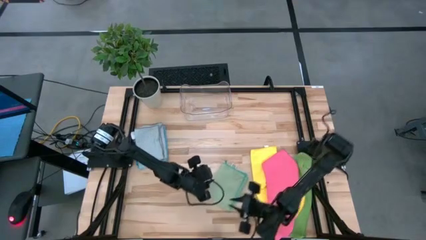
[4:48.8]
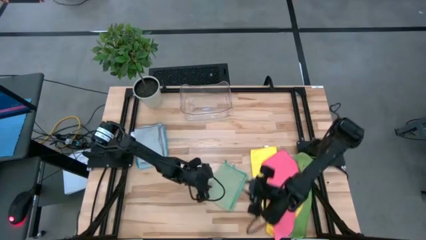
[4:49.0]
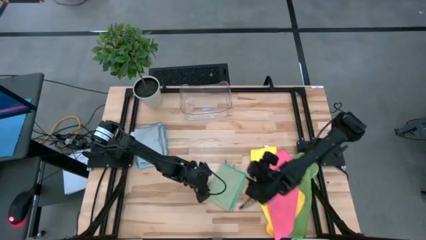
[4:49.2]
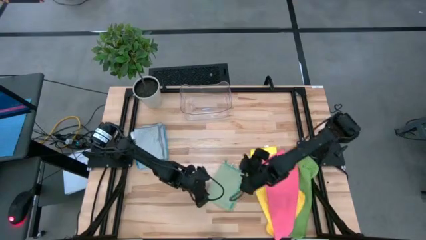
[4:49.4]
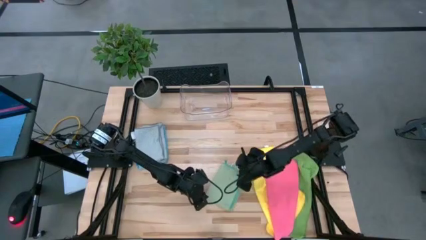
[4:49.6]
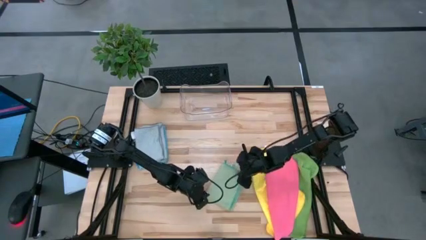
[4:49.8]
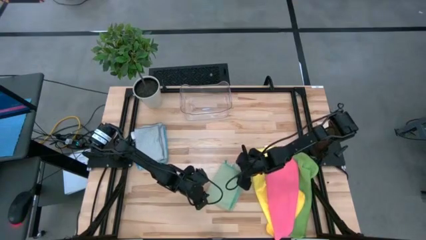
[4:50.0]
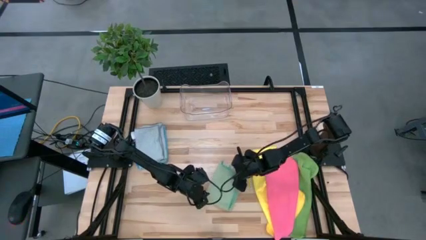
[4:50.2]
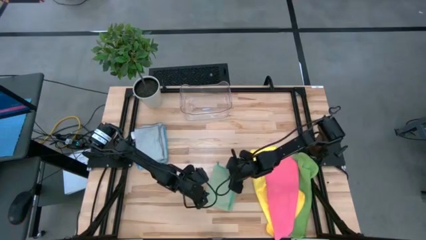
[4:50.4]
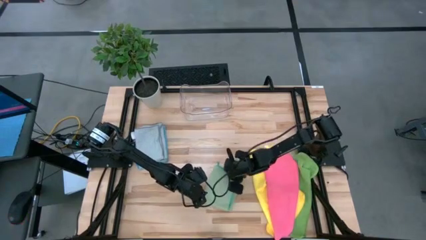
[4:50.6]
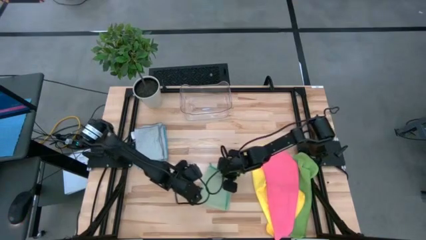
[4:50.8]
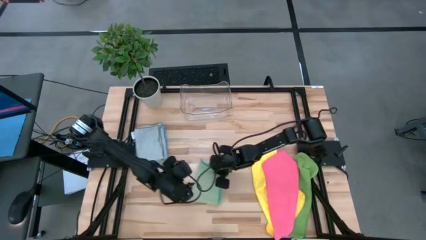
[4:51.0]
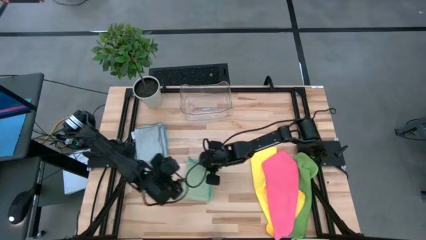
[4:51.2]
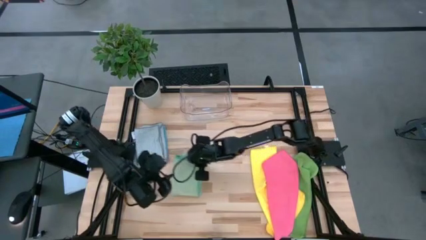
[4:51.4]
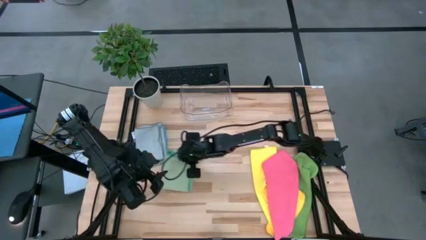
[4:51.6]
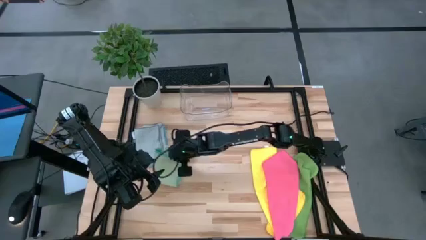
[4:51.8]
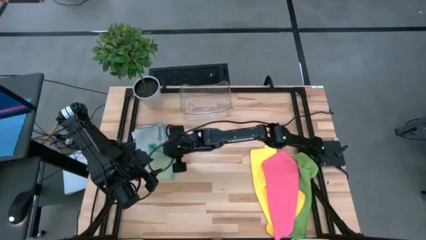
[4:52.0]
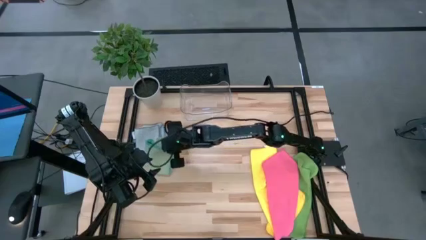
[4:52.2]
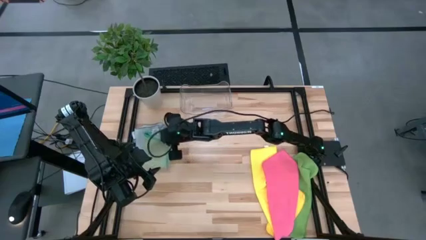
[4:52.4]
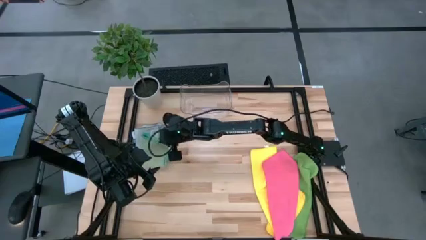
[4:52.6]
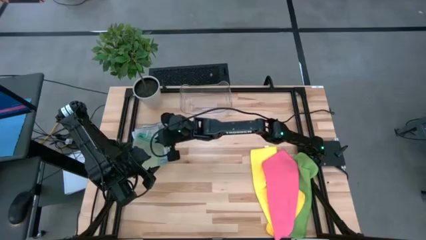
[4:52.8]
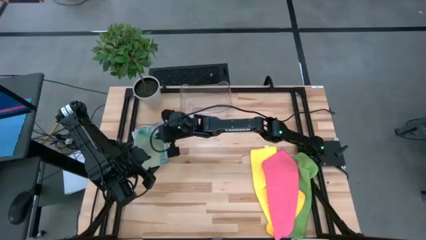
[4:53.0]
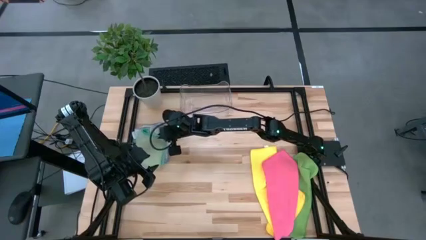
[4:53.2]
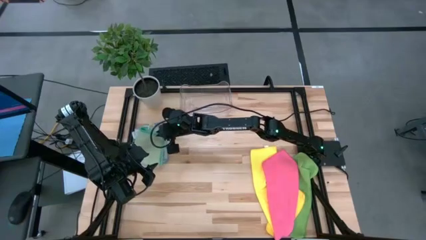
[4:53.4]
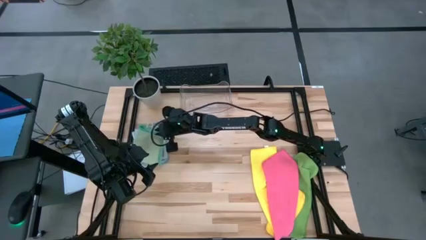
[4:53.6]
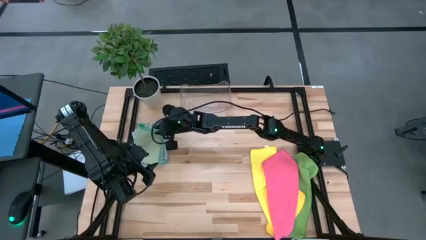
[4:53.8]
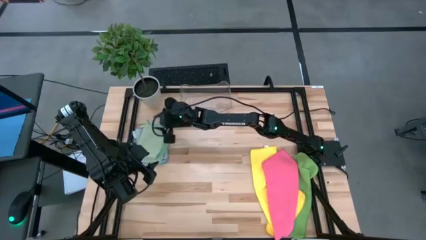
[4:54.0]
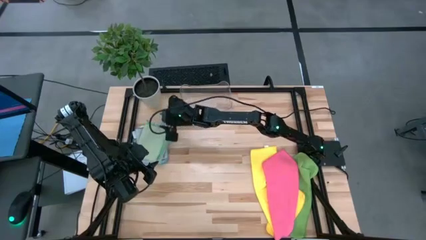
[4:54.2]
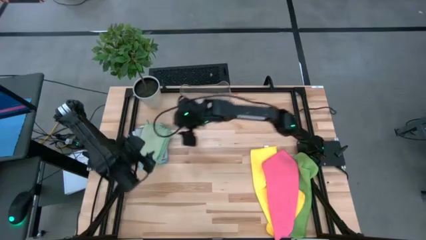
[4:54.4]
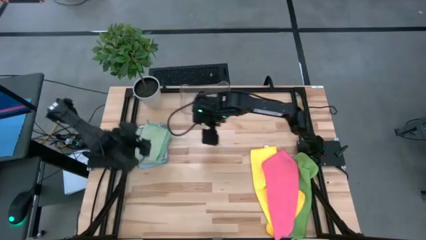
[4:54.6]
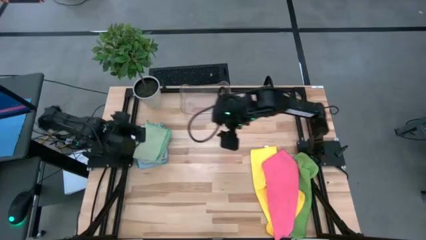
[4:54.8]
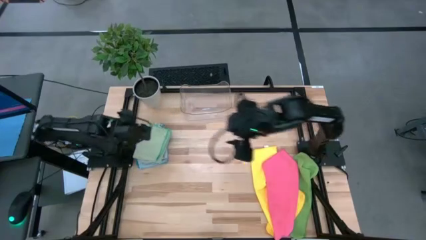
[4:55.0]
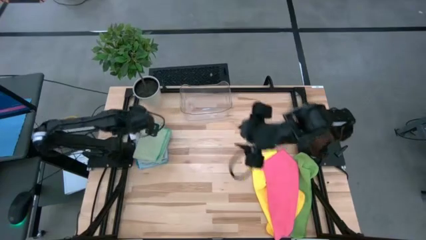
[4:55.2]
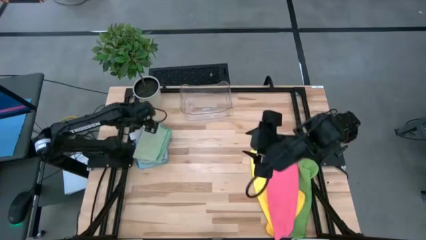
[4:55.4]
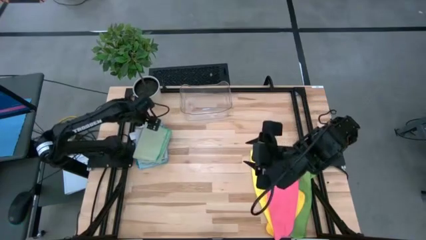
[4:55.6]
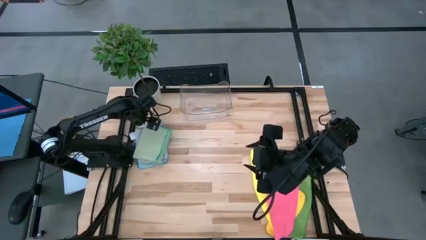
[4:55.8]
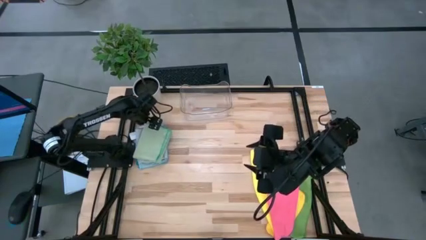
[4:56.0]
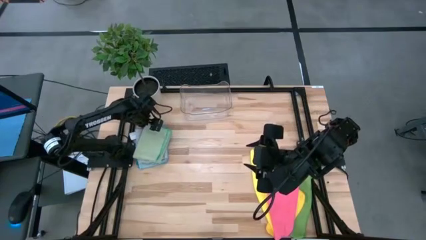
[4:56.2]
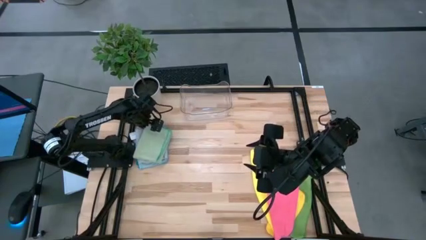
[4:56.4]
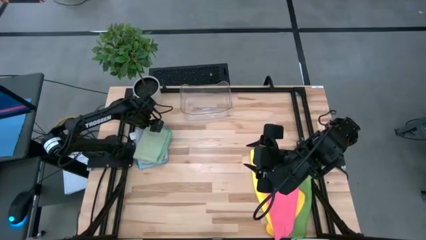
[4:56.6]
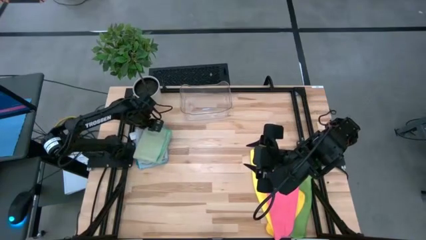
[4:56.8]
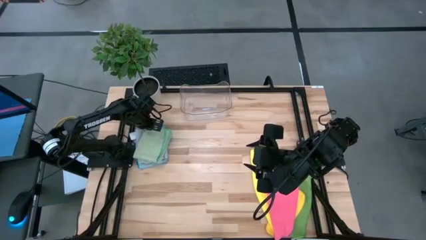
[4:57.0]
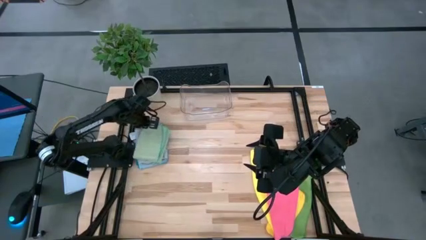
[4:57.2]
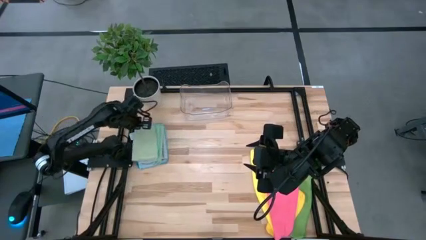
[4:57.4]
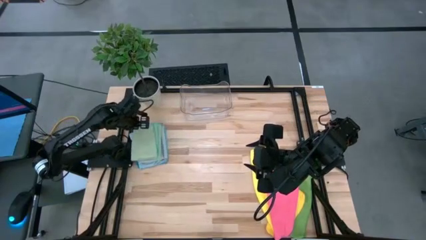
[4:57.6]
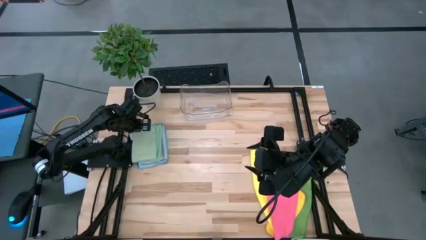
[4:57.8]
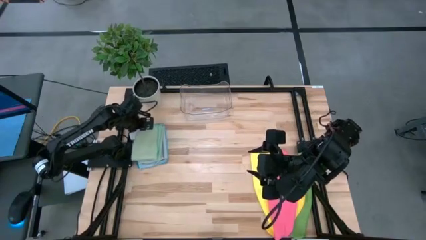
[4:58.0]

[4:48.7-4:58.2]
Task: Fold microfiber towels
Stack the folded light green microfiber cloth on top of the folded gray microfiber cloth

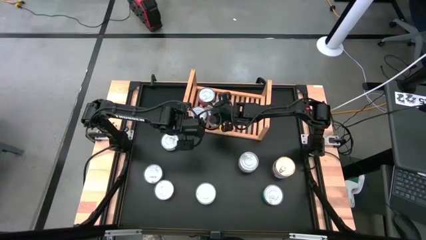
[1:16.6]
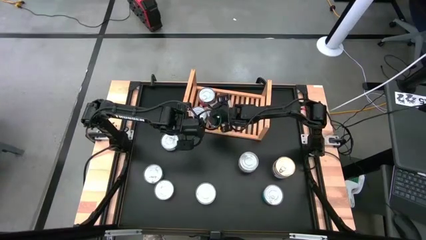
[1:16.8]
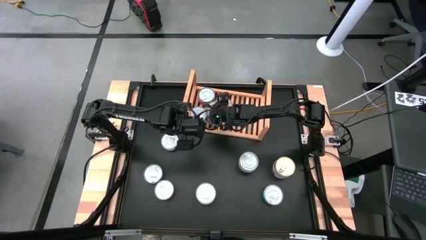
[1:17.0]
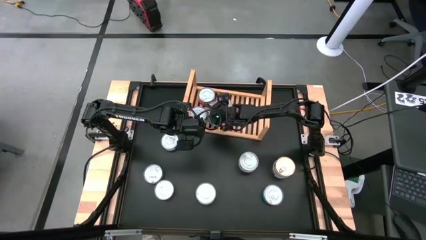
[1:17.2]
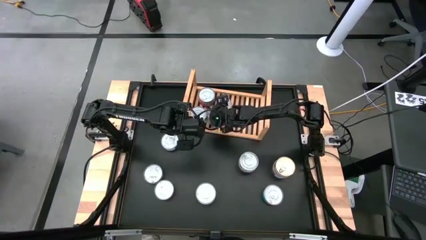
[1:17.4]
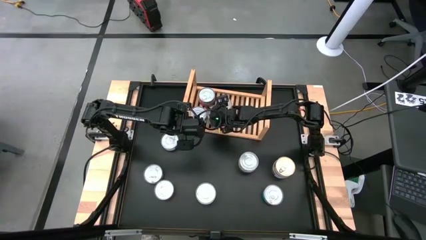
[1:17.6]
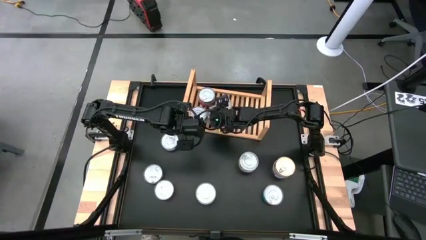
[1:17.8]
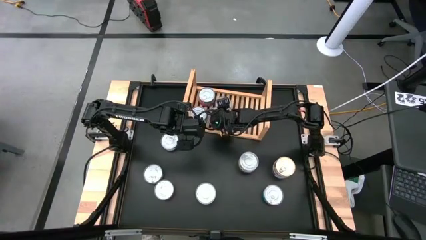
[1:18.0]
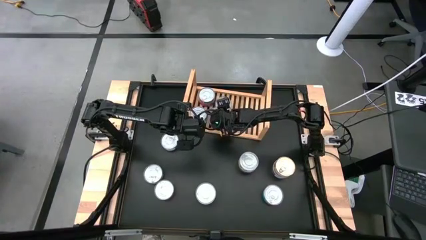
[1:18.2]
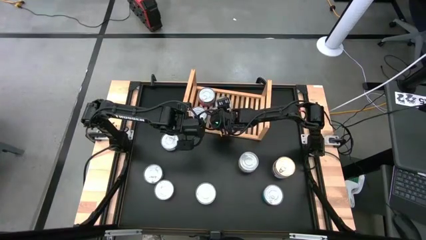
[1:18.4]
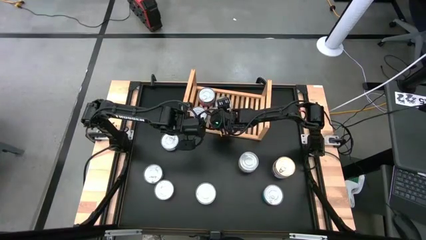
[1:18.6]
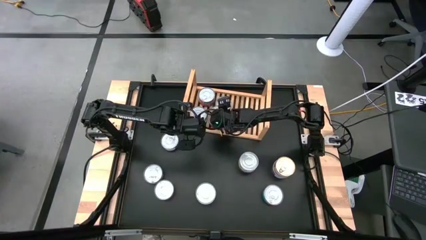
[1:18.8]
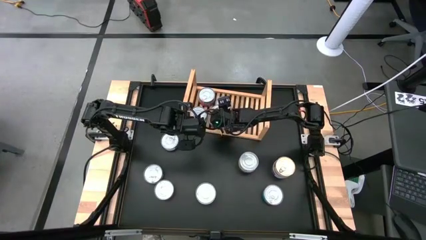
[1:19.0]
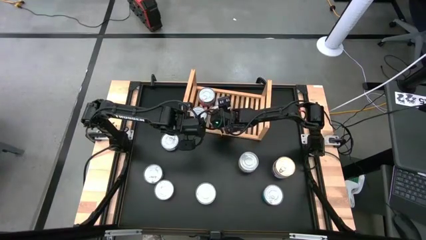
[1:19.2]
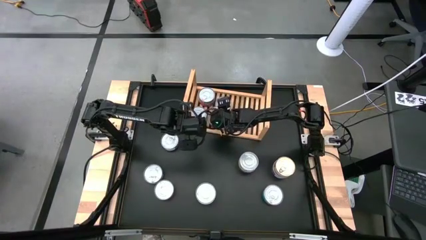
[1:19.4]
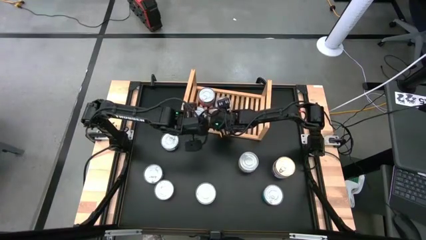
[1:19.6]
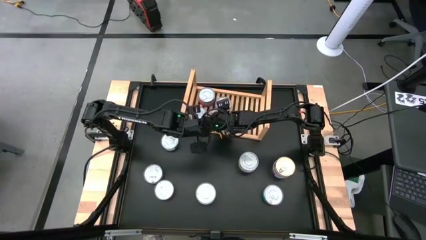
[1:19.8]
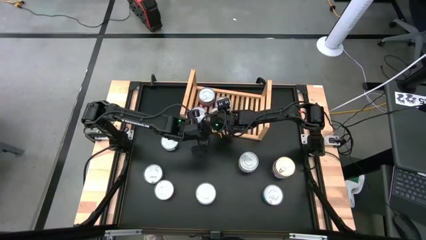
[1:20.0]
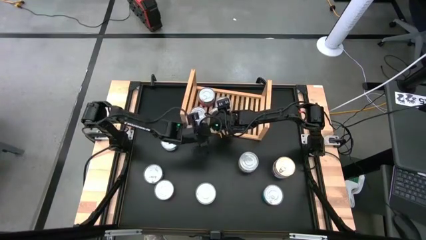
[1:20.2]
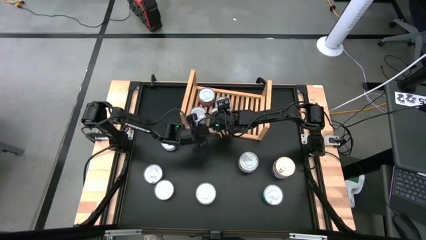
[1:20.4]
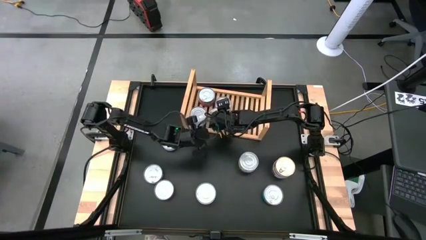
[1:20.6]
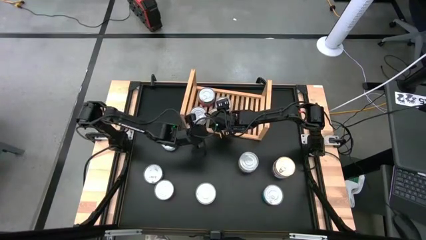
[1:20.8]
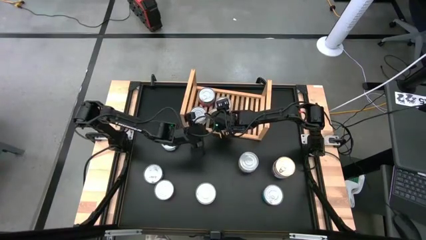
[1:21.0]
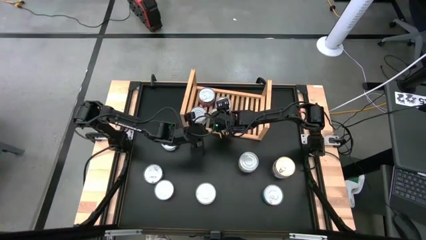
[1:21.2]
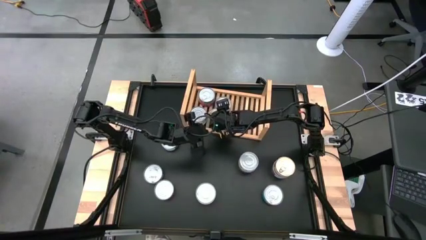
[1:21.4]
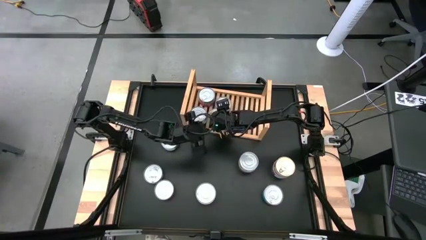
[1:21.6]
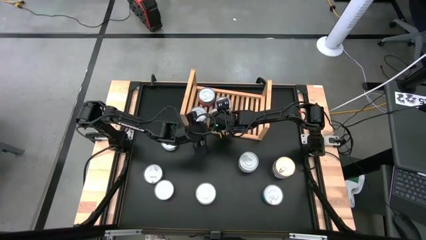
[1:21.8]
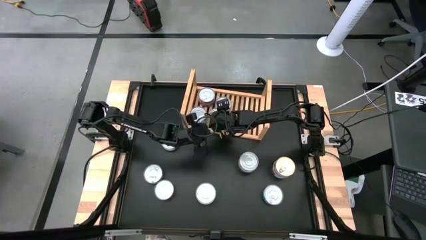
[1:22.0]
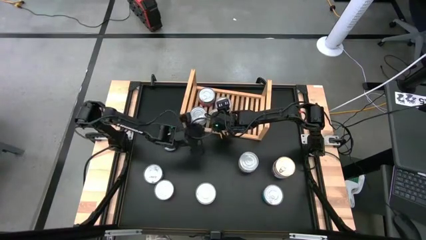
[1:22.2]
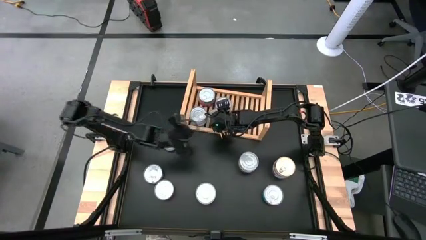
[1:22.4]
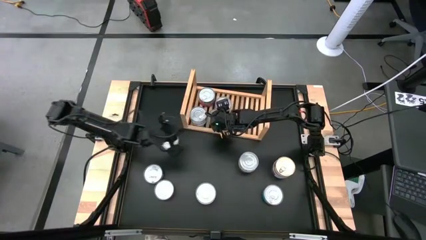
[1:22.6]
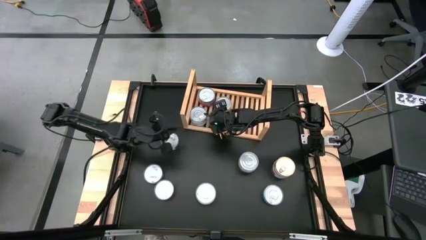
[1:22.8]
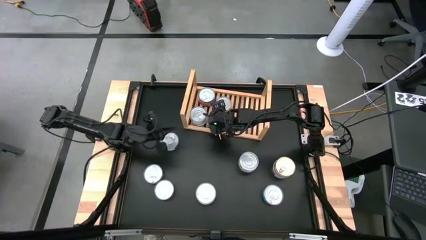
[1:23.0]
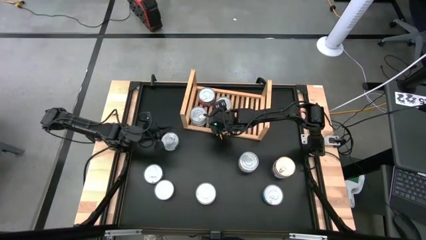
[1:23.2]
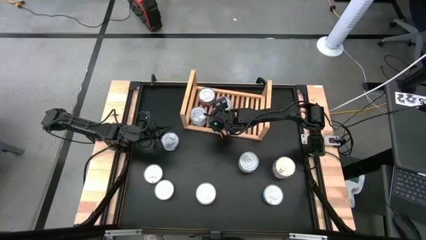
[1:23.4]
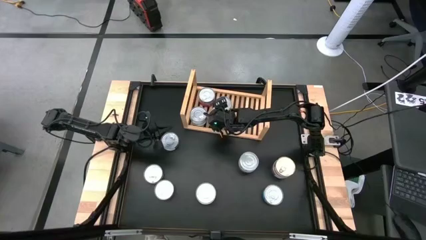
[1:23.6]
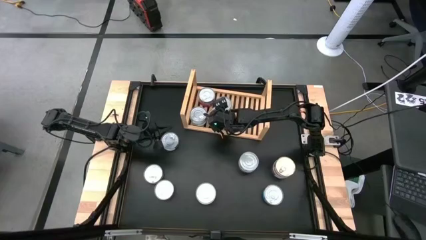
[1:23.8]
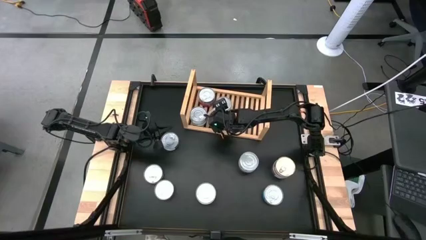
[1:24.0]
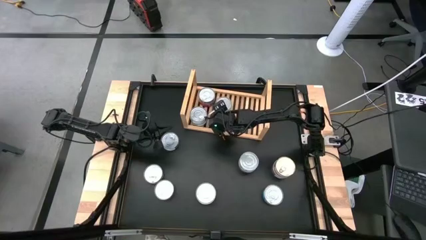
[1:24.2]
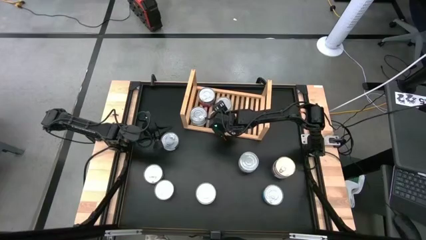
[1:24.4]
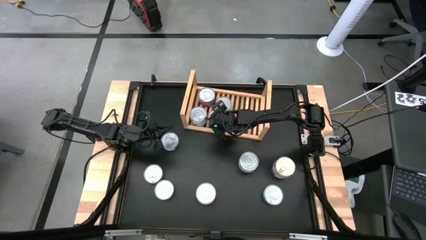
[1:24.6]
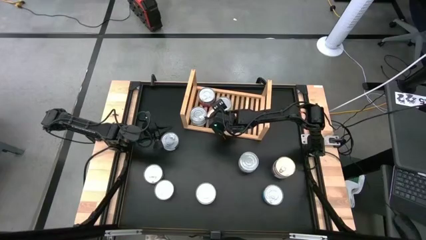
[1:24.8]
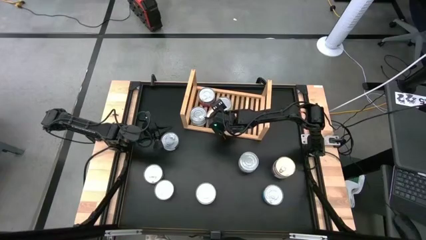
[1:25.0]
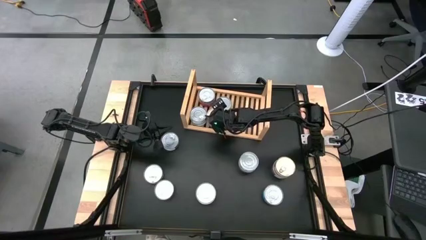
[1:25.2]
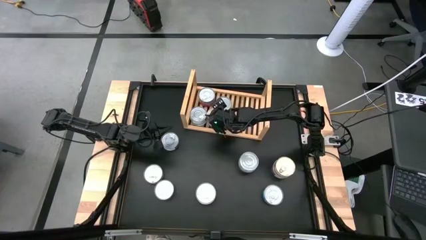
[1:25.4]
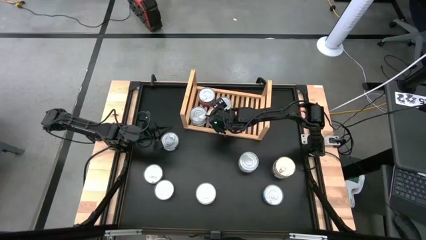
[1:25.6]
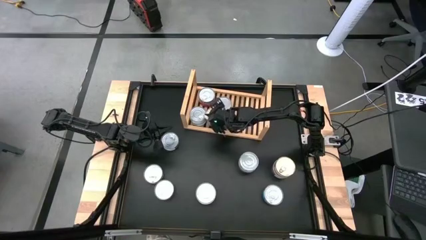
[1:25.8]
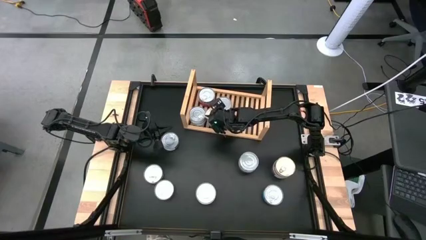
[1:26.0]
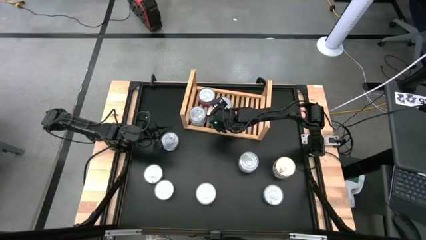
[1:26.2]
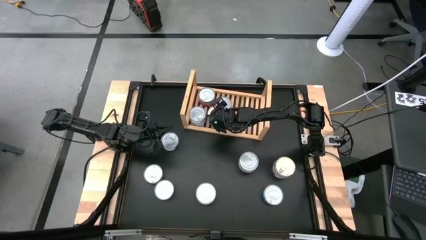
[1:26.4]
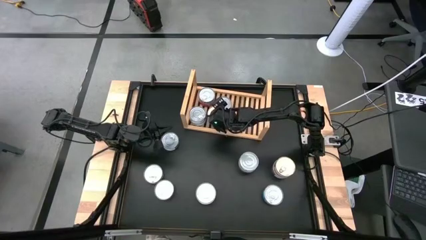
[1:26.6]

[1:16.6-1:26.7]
Task: Stack canned seafood by type on shelf
Stack the blue tuna can on top of the other blue tuna can on the shelf
